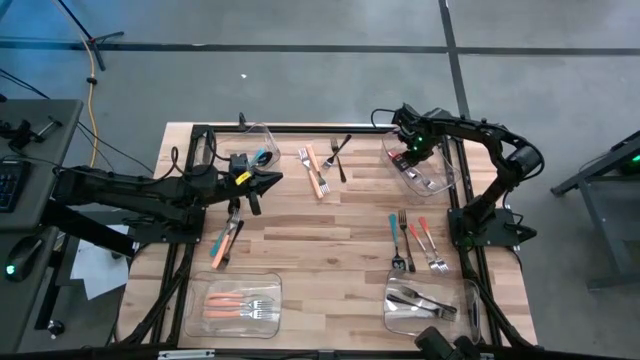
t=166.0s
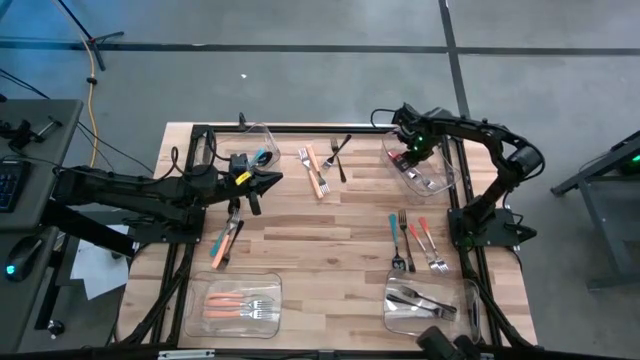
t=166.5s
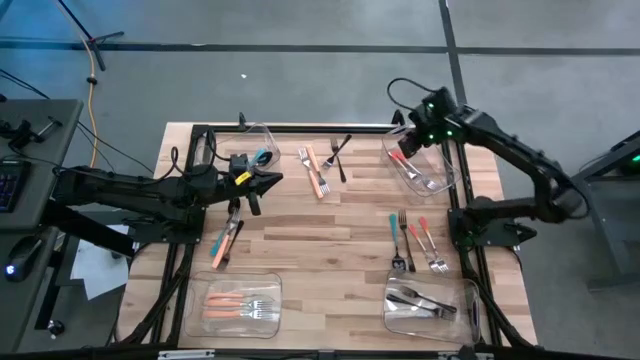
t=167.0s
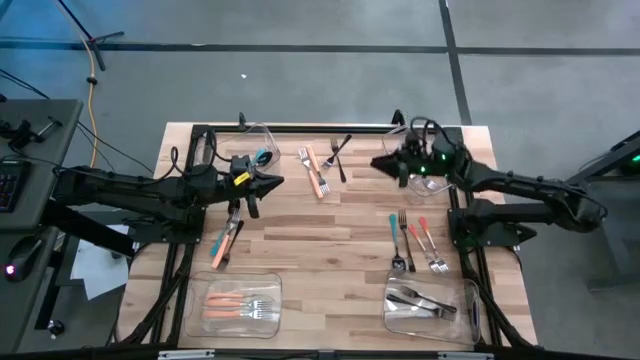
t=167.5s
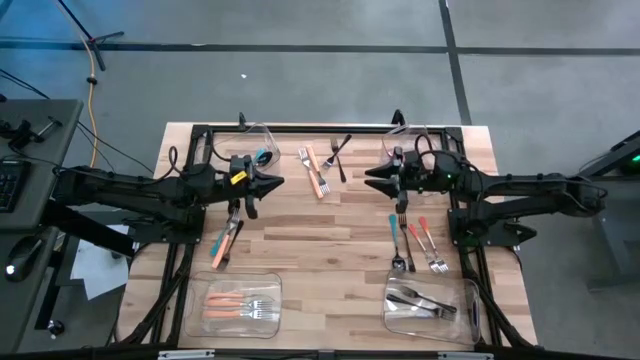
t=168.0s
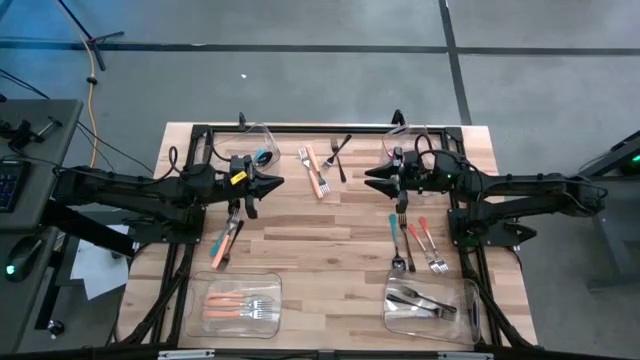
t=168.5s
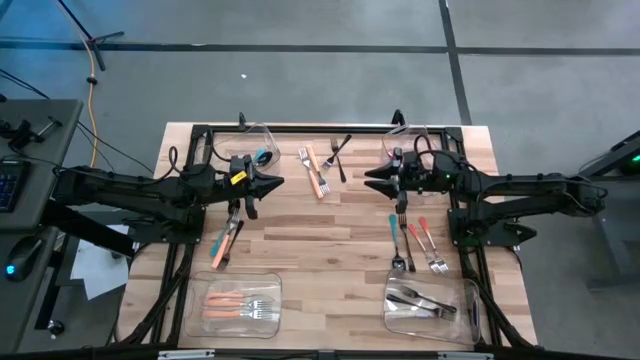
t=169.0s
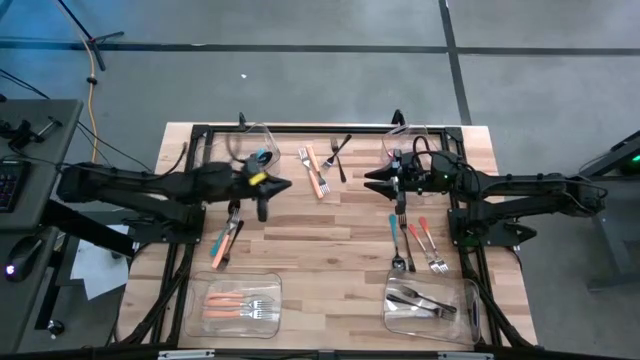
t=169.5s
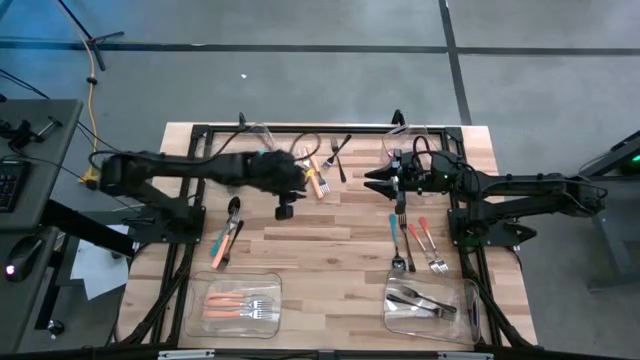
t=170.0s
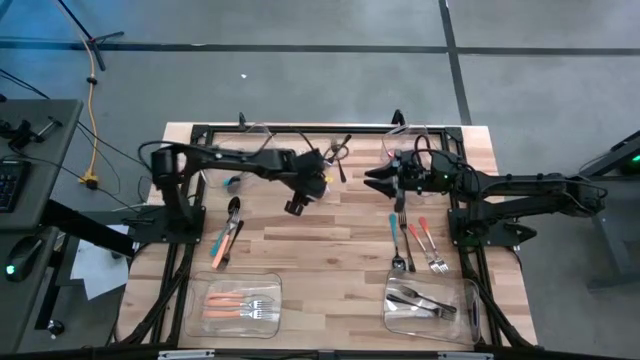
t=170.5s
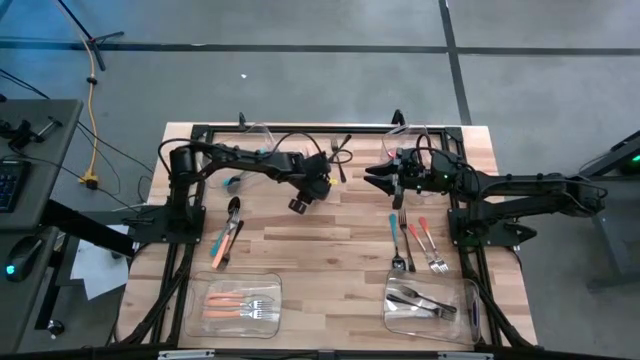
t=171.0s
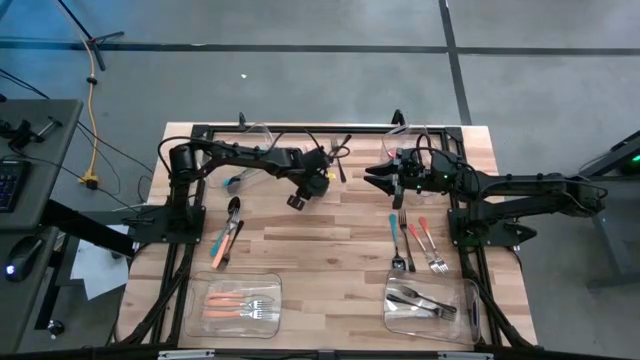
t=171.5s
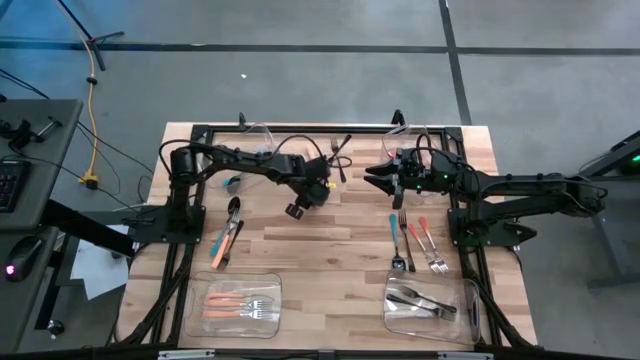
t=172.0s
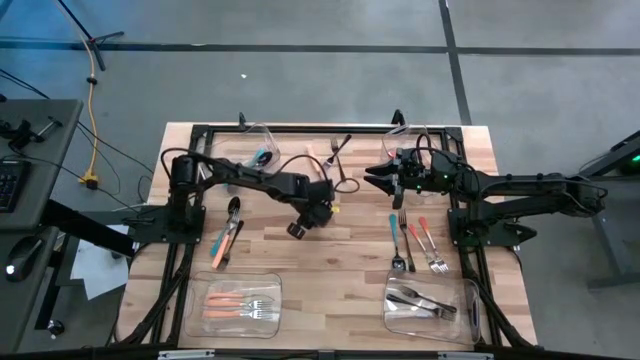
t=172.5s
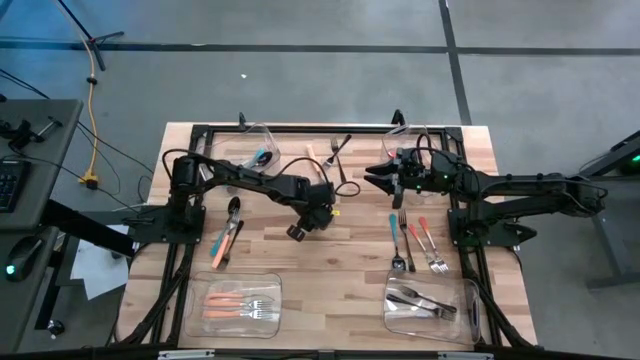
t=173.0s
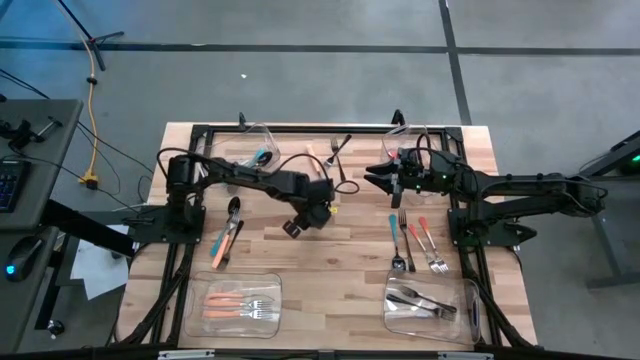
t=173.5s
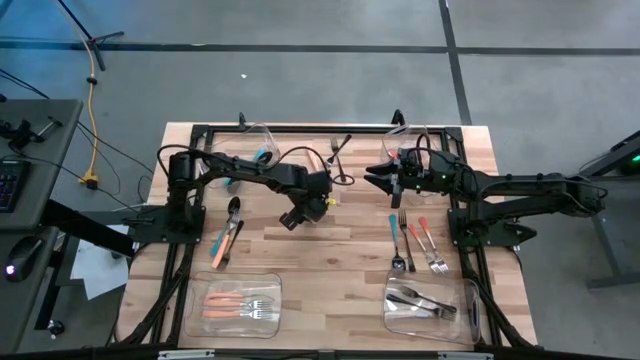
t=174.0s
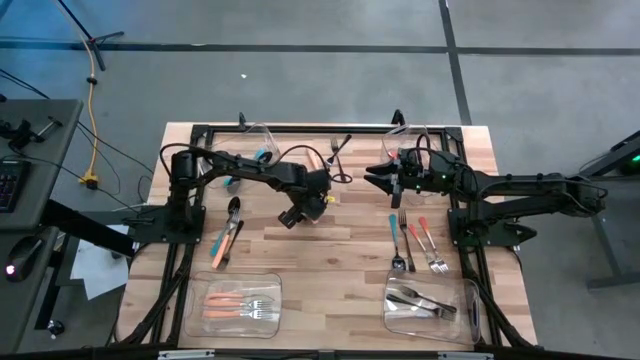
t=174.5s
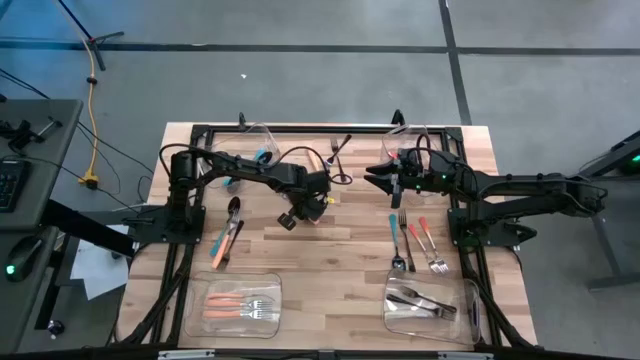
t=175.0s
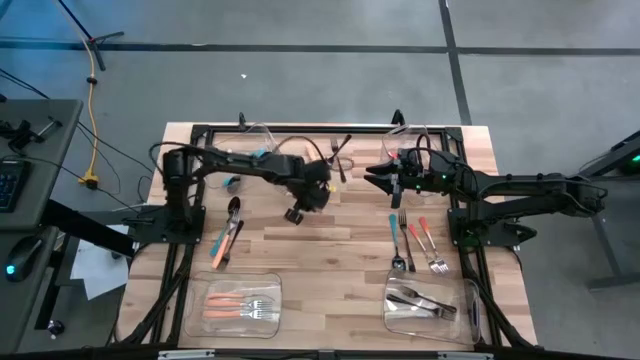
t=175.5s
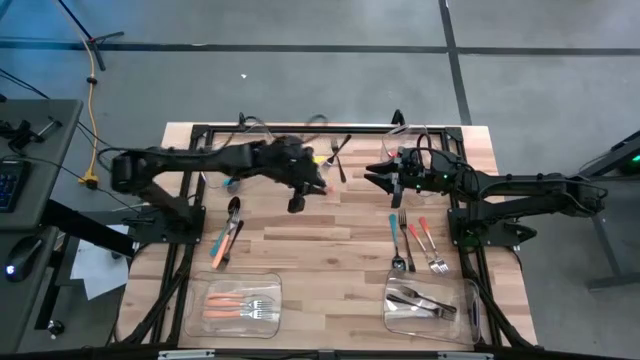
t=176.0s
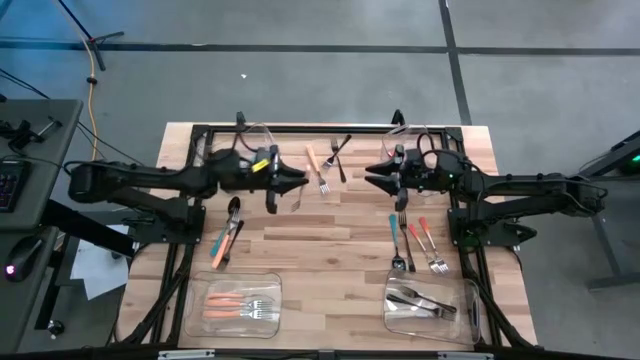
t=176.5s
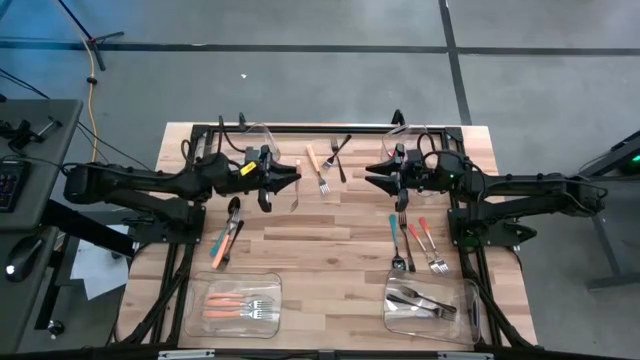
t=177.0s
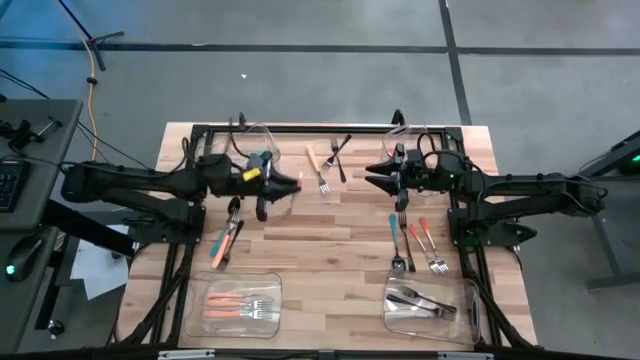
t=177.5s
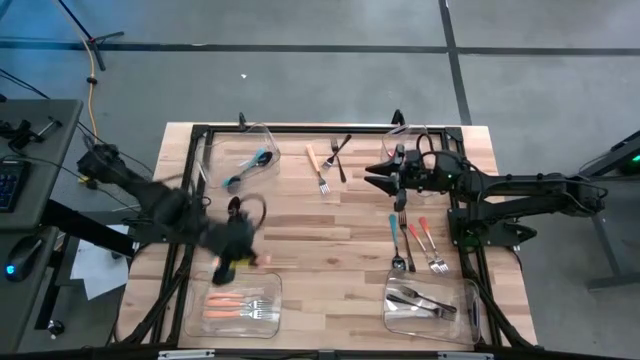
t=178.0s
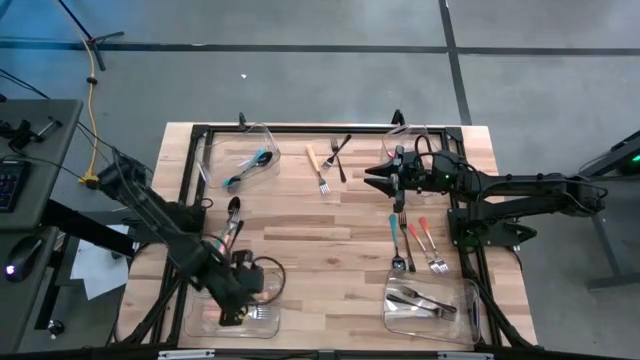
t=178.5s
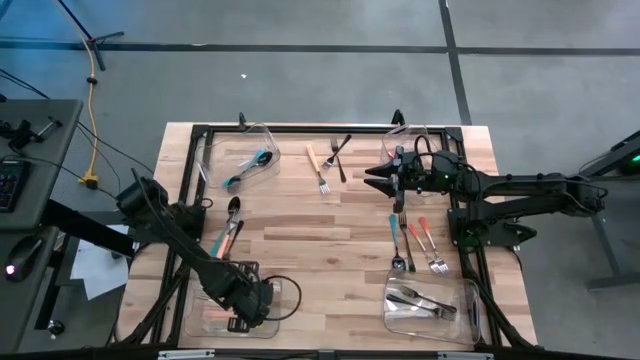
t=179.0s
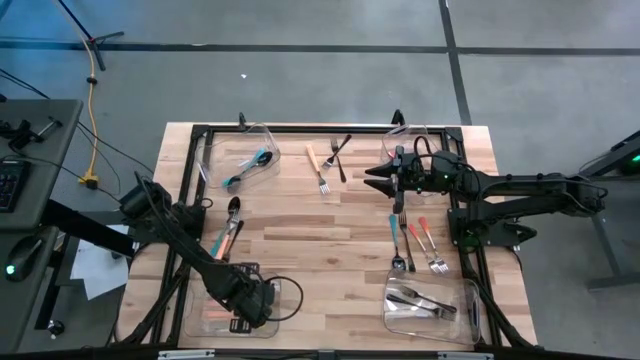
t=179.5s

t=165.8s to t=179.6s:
Task: Sort silverware by color (type)
Put the light orange fork into the bottom left transparent bin

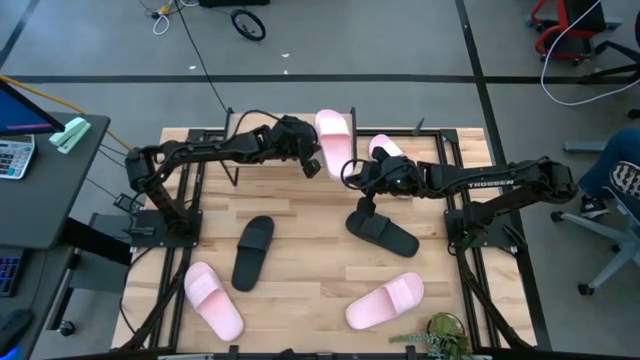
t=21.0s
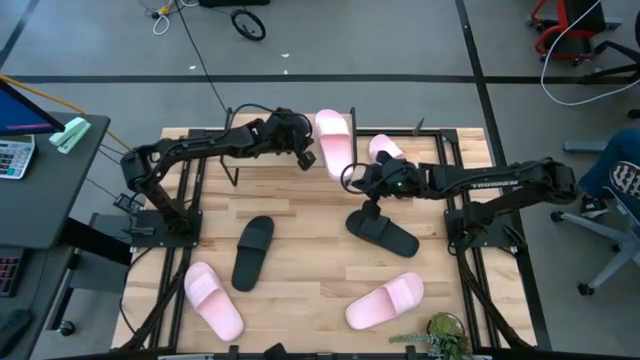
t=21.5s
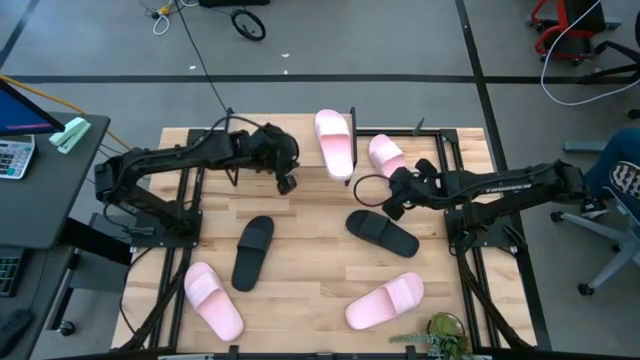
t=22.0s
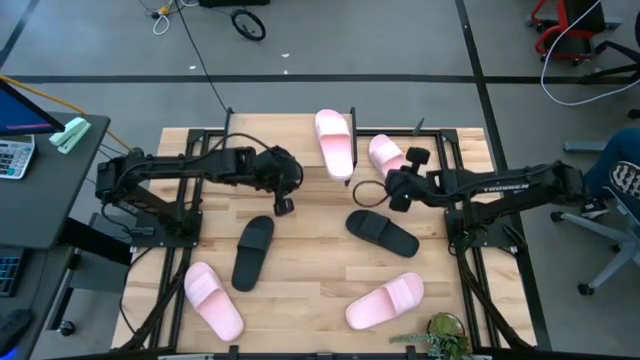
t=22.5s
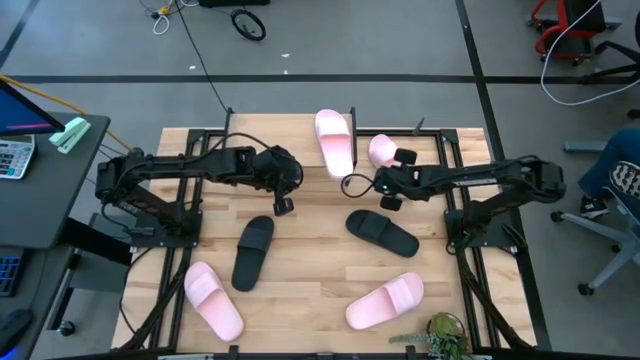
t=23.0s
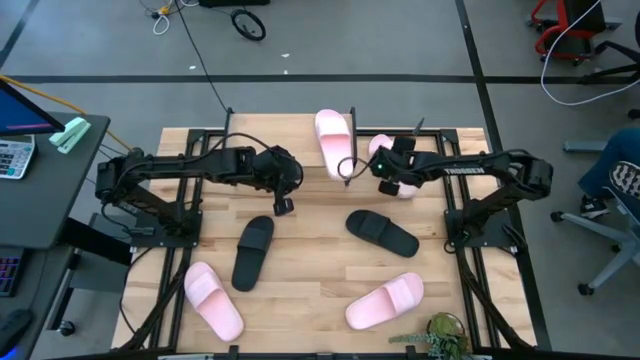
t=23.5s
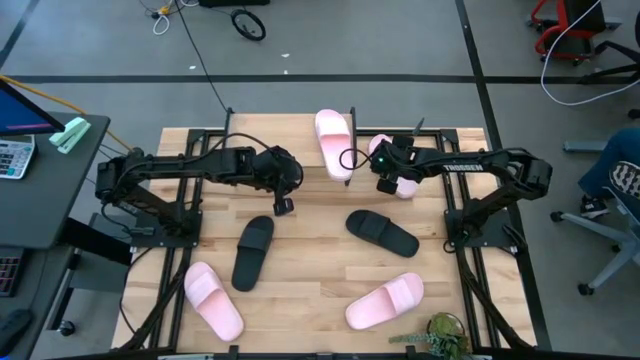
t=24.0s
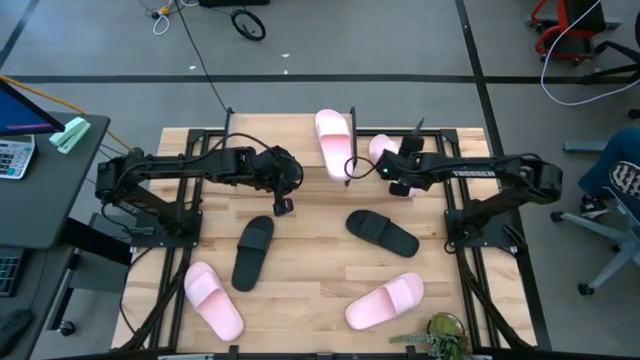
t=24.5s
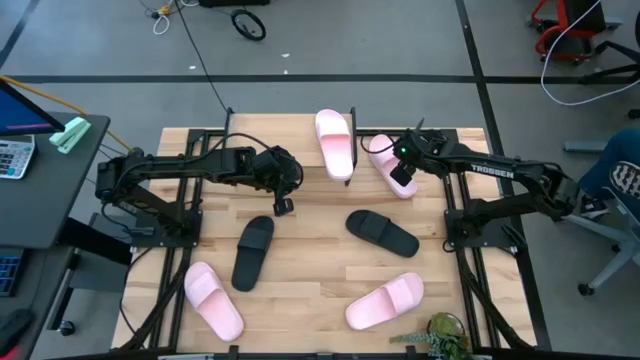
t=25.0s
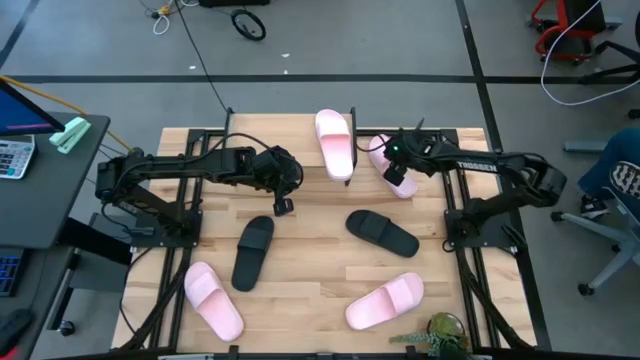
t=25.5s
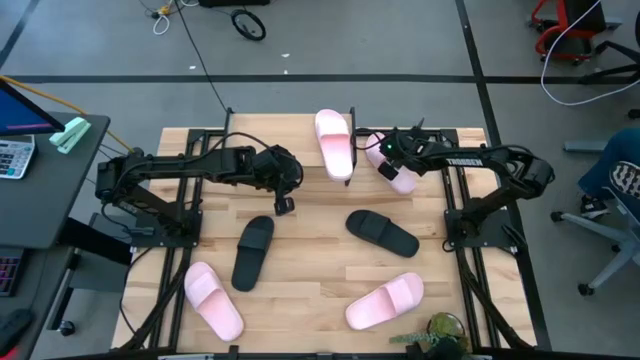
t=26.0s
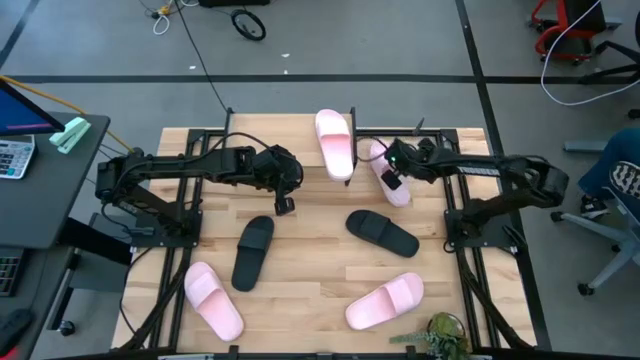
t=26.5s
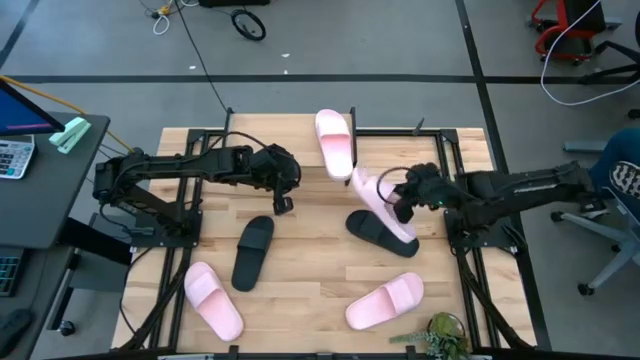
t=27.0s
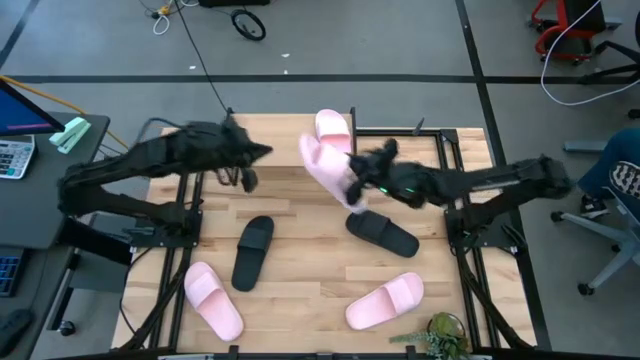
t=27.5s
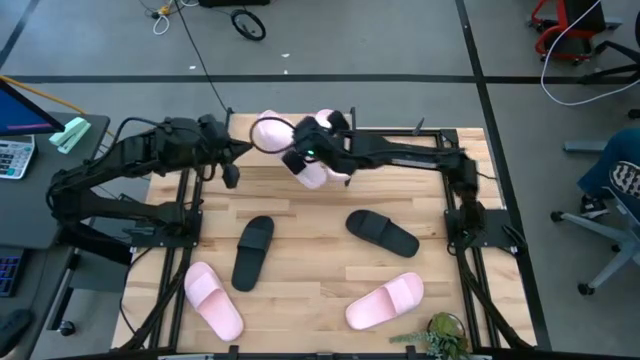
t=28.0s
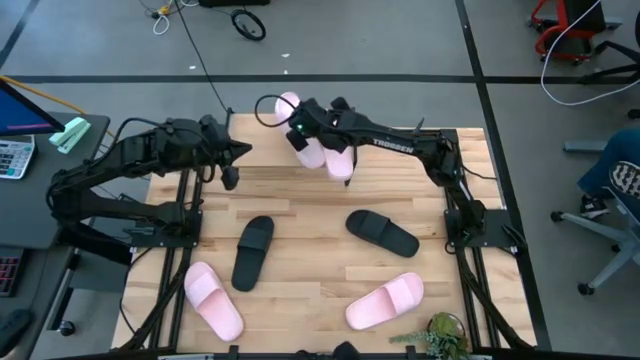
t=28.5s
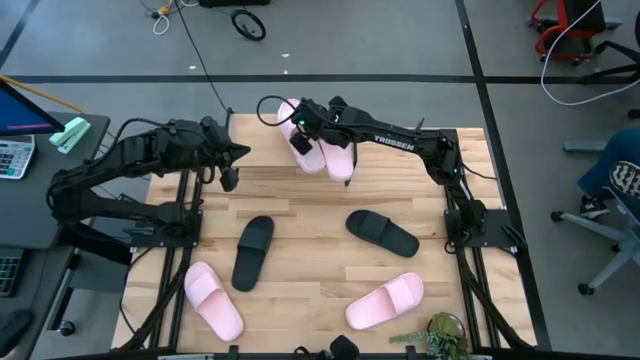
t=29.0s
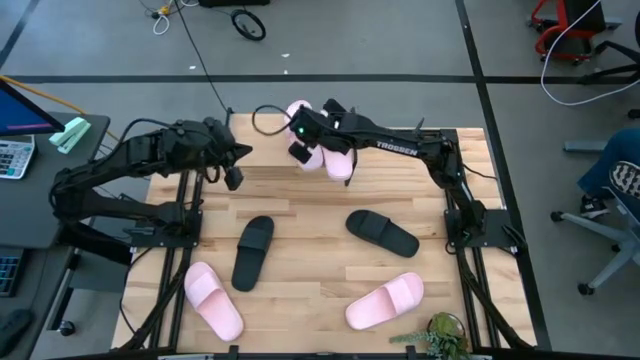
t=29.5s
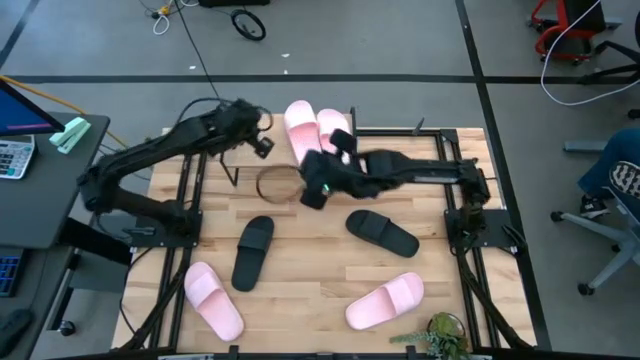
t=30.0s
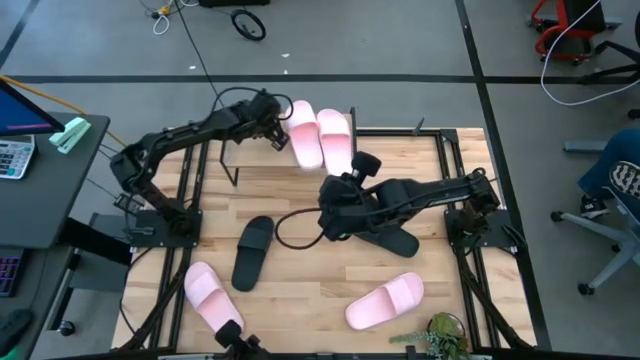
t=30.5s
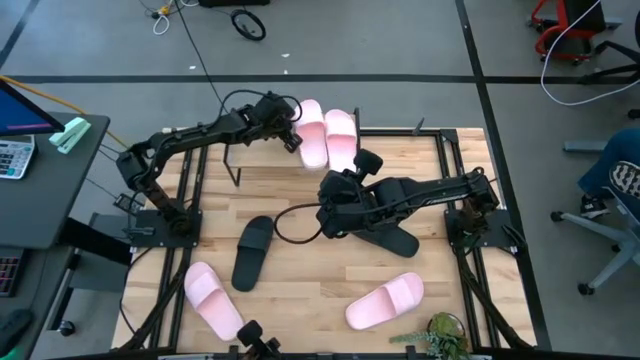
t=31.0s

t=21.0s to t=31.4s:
Task: Pick and place slides into the shelf
Put the pink slipper on the shelf
